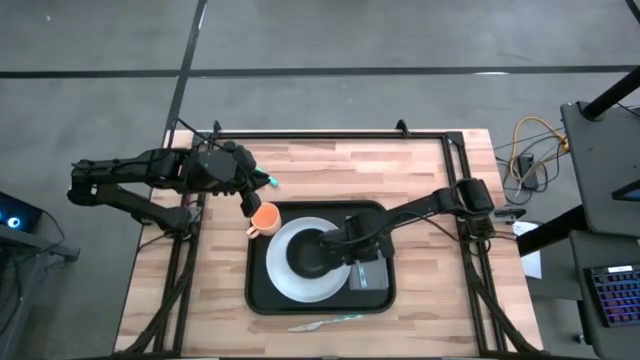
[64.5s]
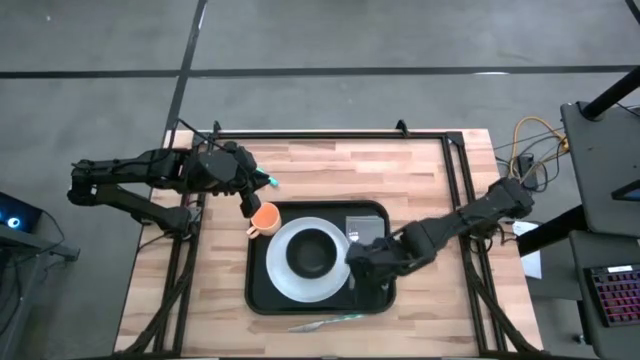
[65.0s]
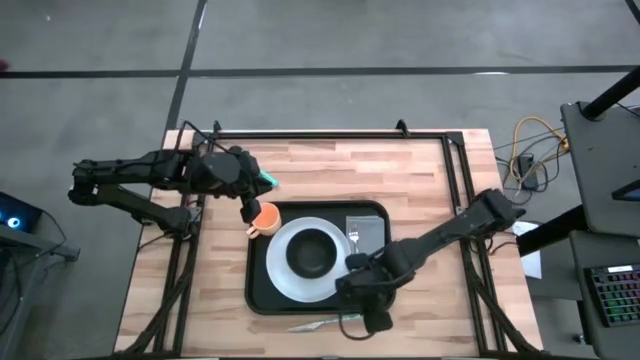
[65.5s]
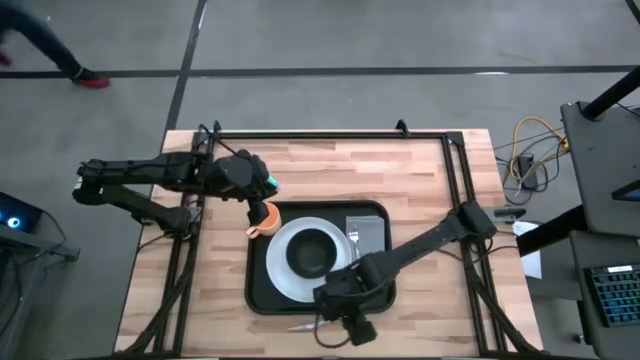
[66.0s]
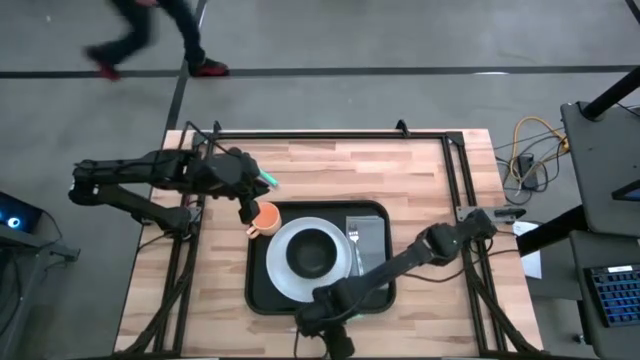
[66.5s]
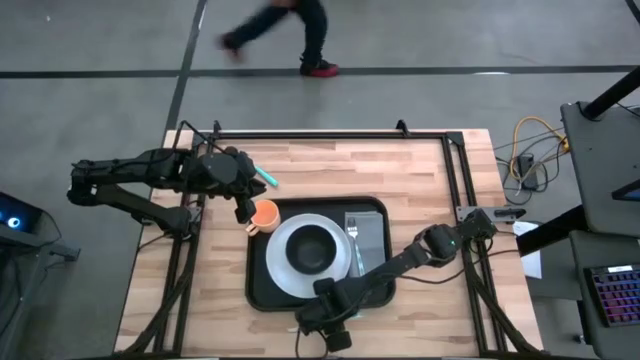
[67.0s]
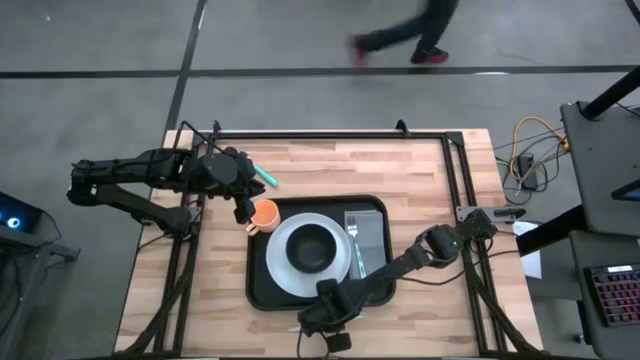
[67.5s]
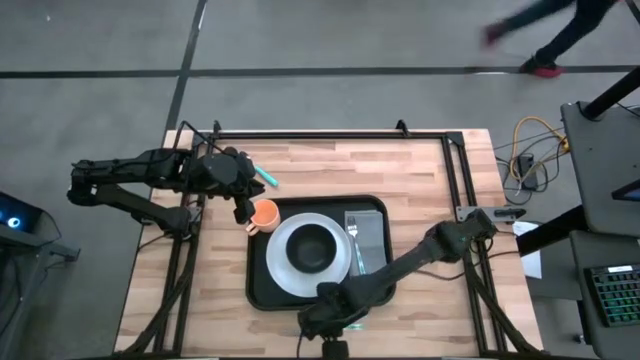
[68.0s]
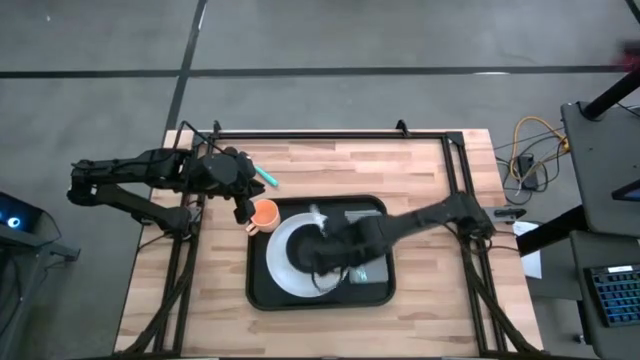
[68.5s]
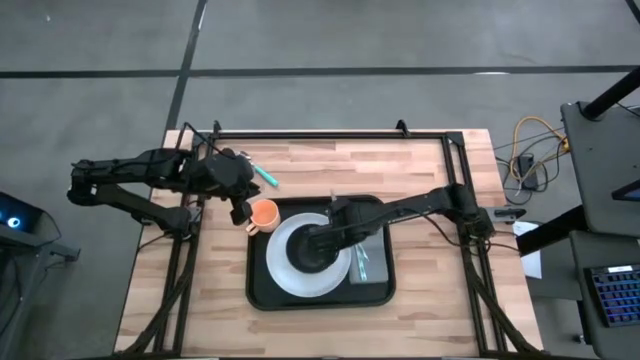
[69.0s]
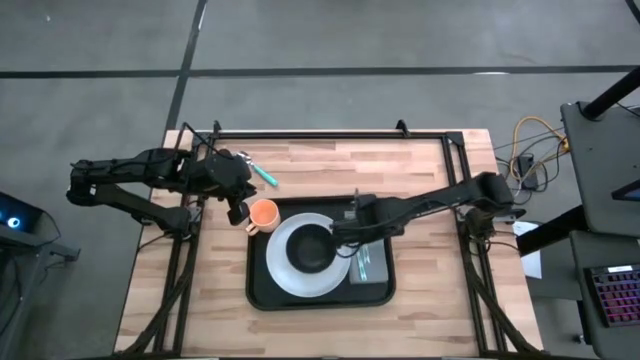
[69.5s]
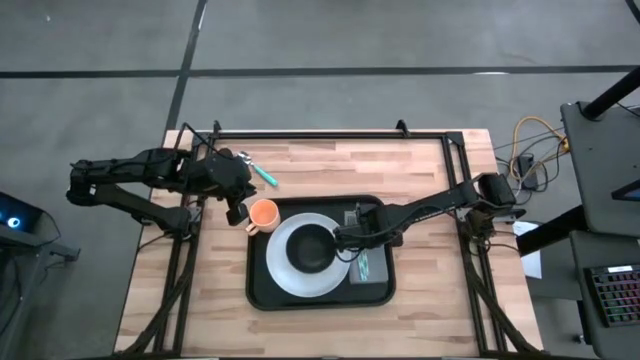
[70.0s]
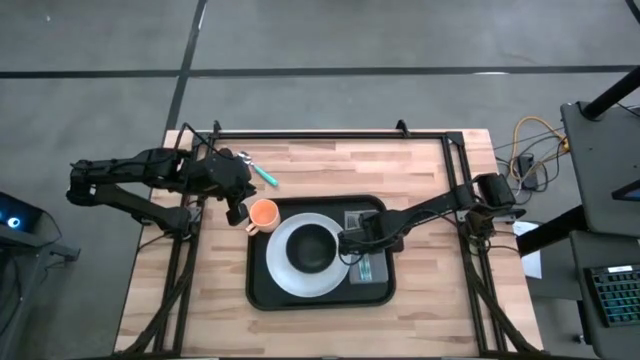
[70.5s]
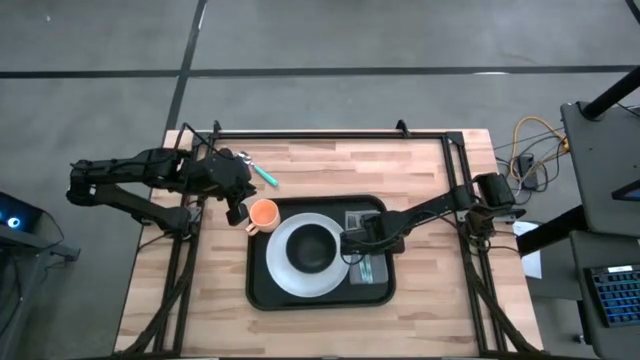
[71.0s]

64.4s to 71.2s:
Task: Set up tray
Put the dinner knife on top of the napkin on the shelf

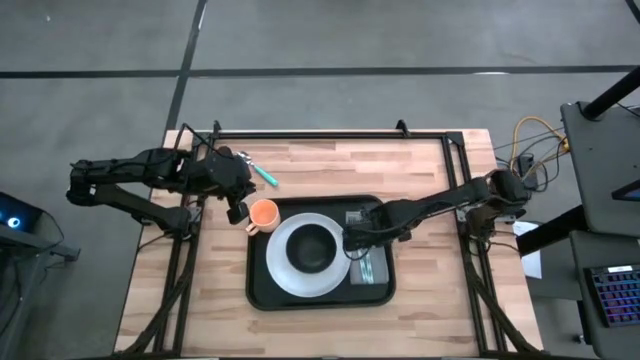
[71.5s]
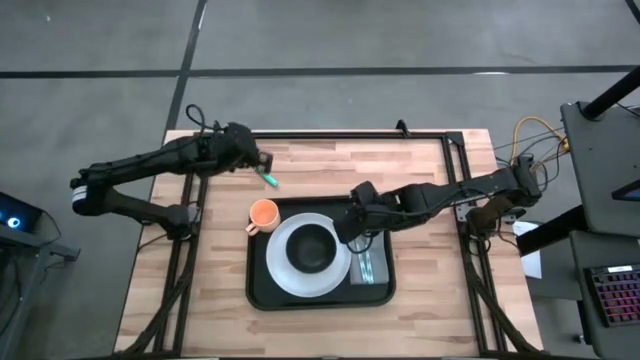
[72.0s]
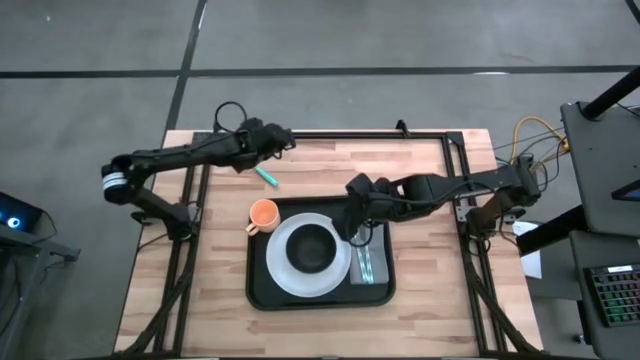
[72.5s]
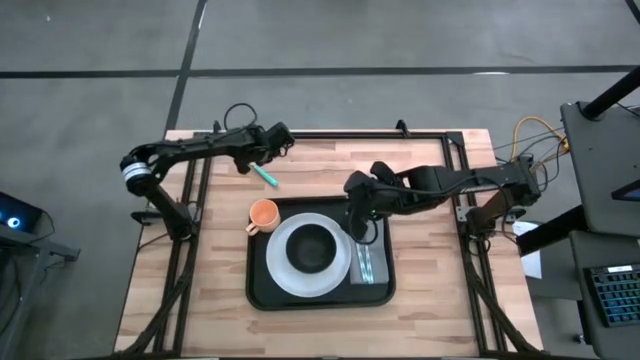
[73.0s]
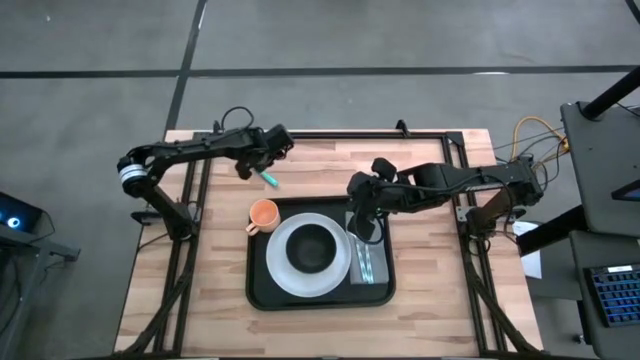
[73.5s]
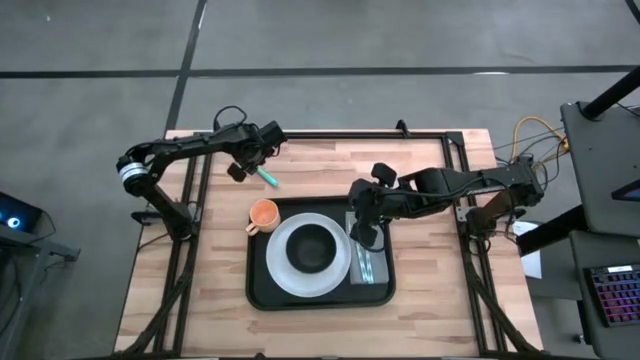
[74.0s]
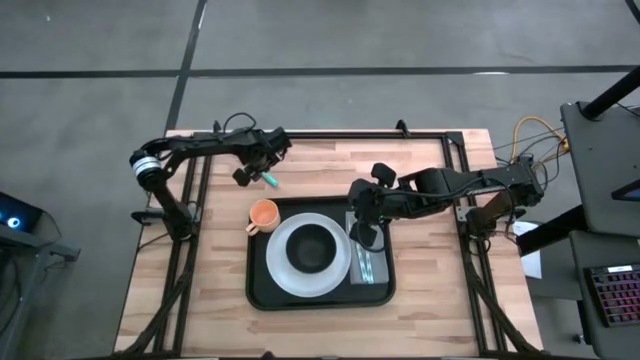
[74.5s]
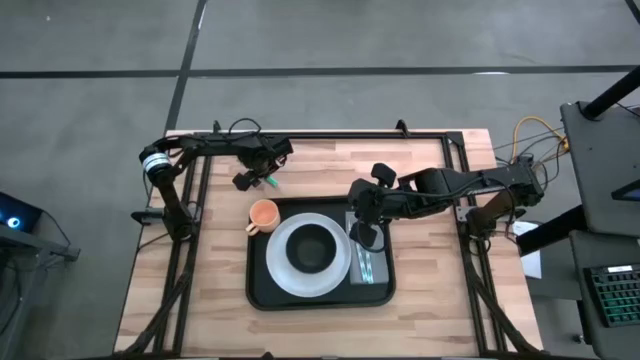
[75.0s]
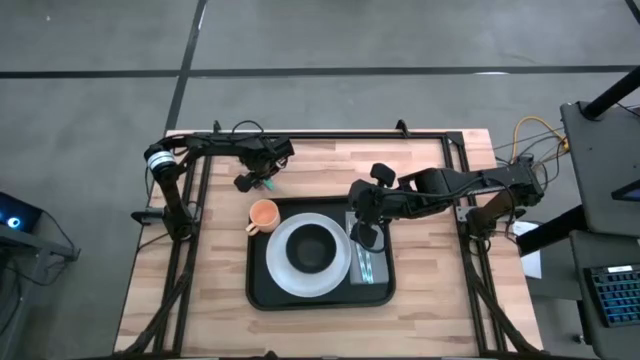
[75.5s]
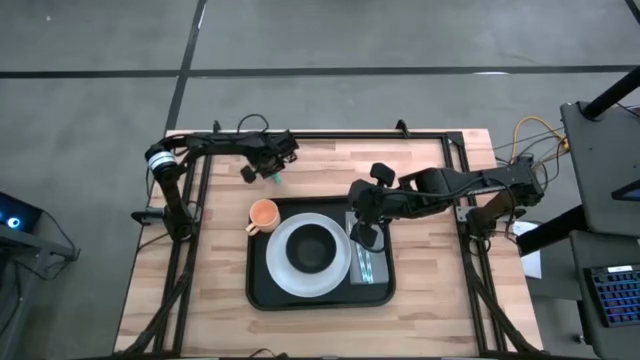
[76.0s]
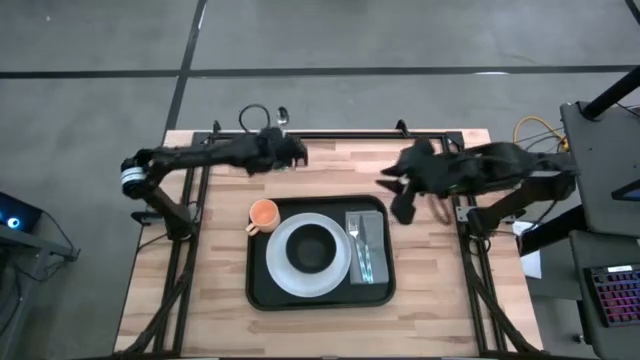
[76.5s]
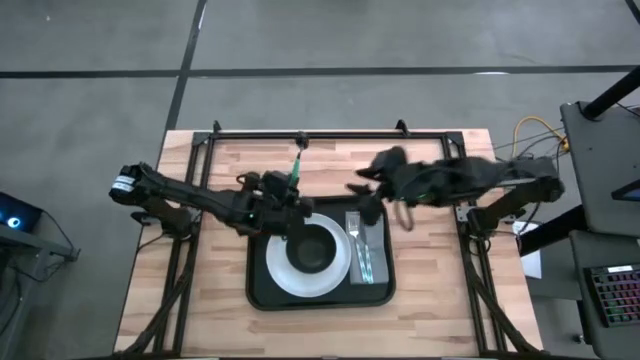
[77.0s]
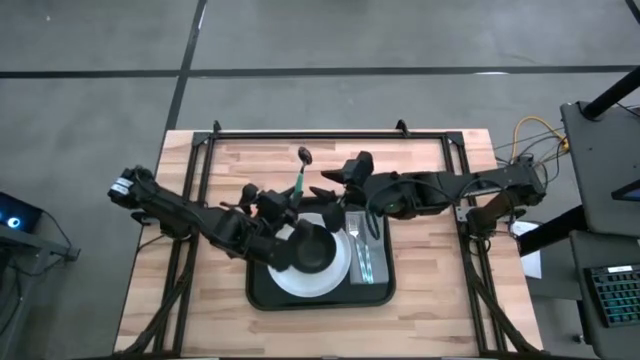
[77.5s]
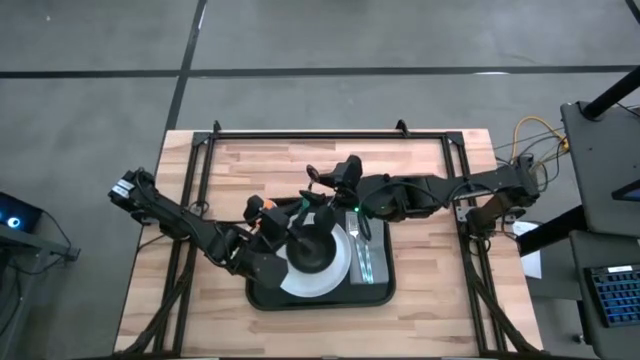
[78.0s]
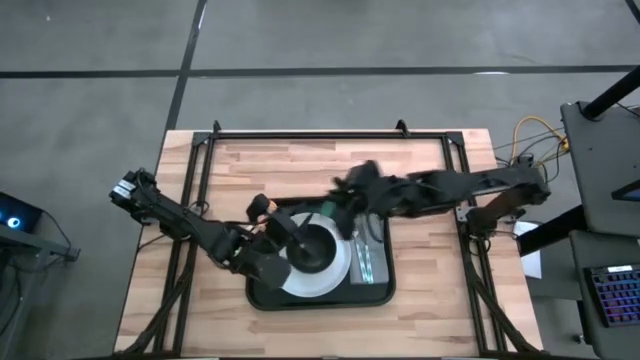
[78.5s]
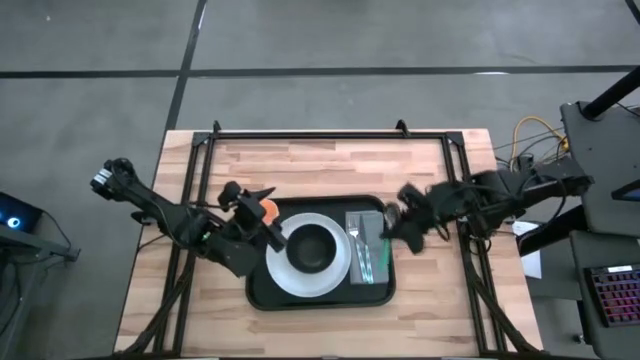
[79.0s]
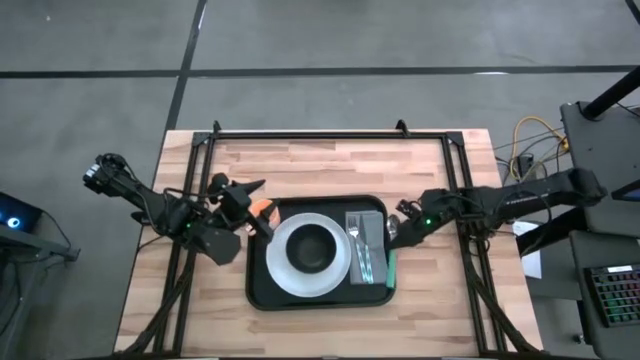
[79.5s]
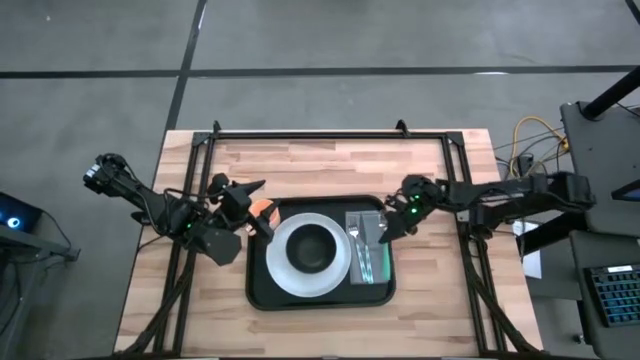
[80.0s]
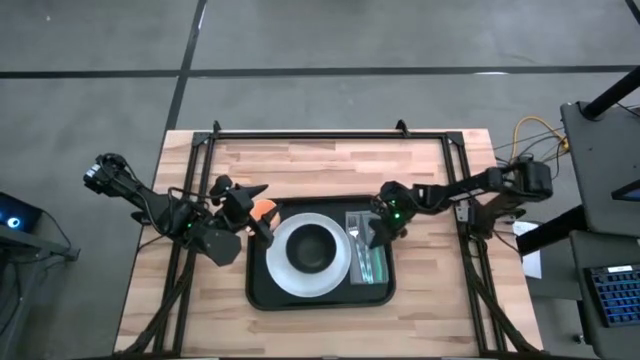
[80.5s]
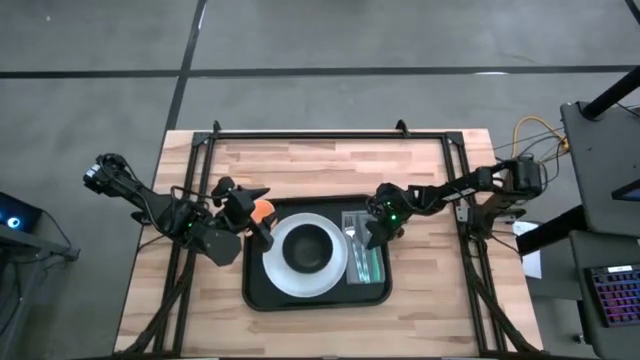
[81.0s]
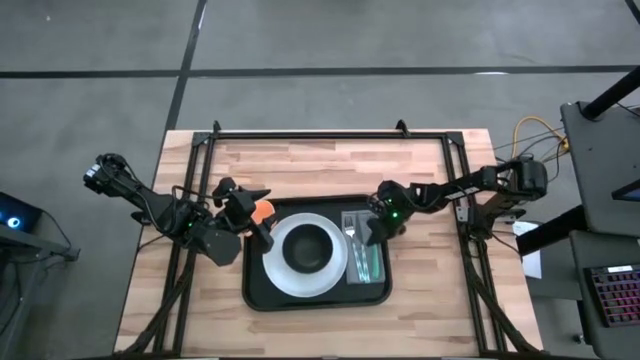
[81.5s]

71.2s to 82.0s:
Put the spoon on top of the napkin on the shelf

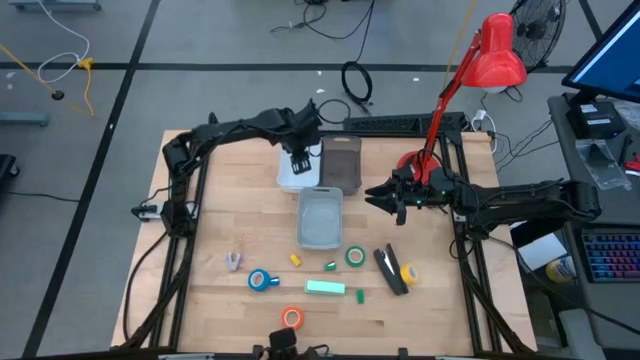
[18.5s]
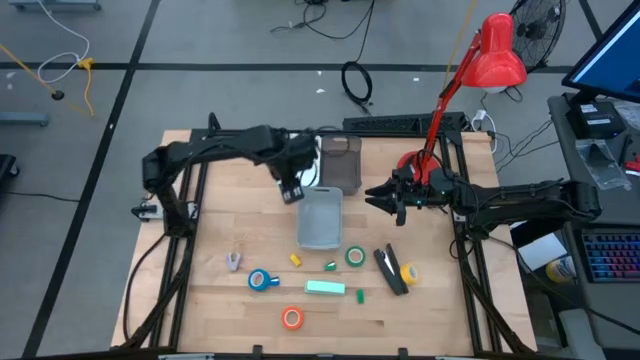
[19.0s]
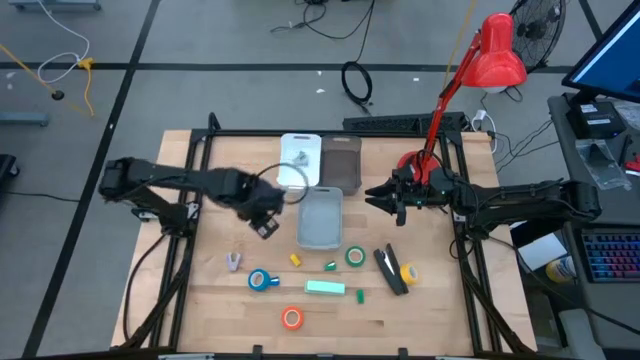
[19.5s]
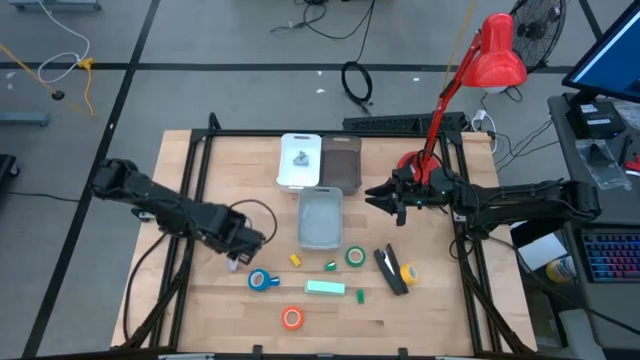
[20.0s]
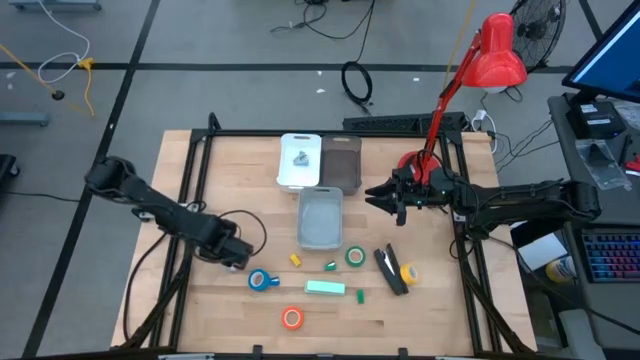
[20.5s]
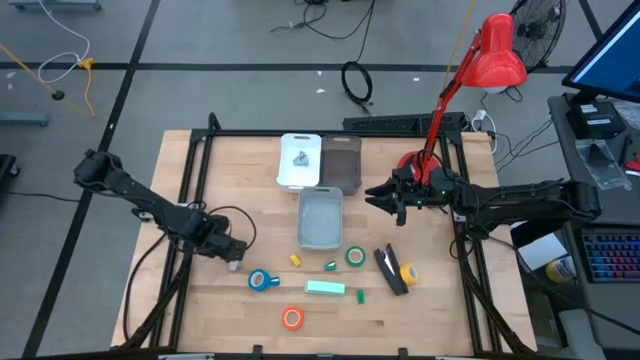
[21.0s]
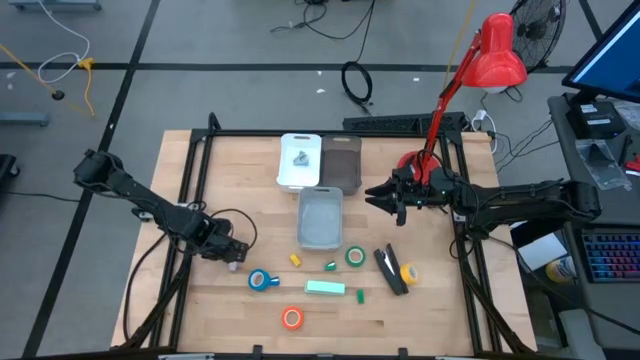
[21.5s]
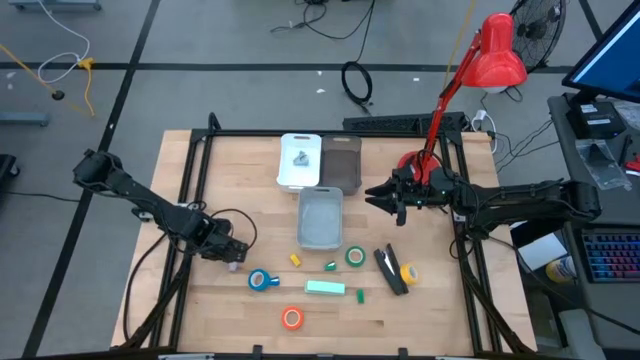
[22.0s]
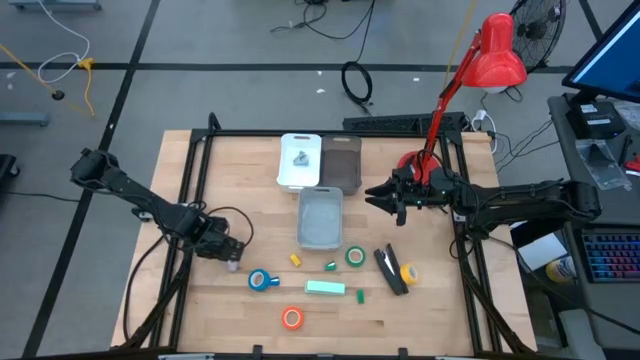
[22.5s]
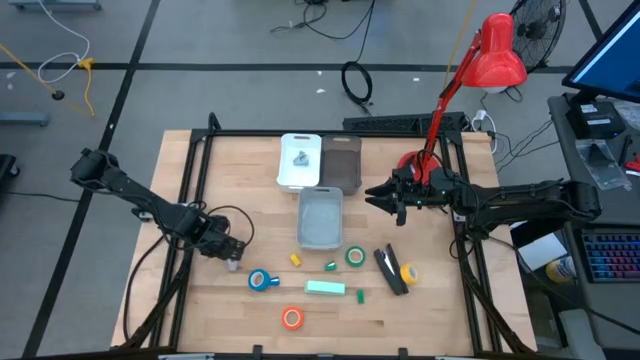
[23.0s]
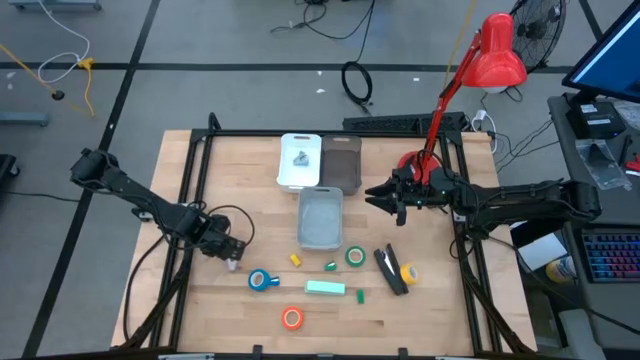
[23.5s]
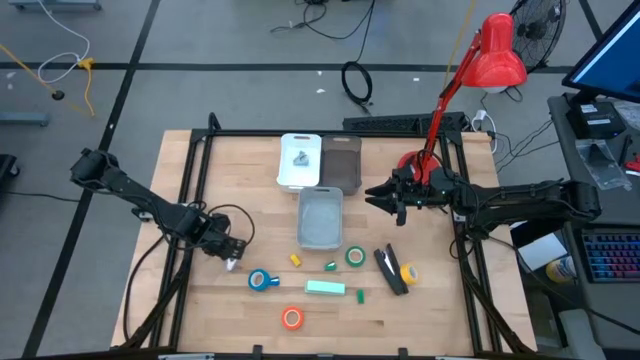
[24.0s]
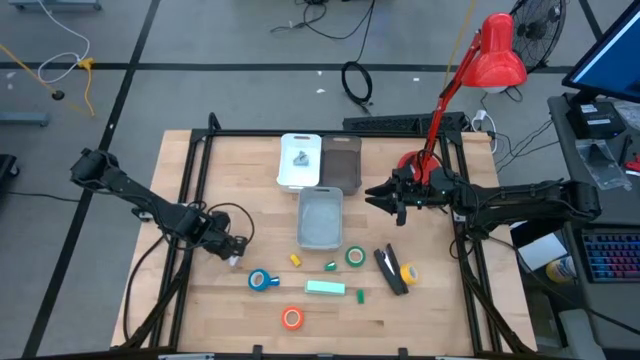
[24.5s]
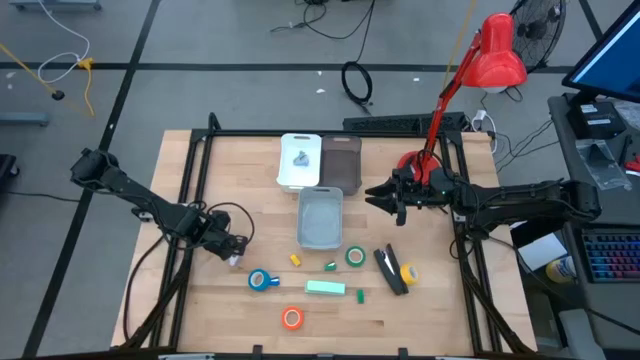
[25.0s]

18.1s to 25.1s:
Task: Pick and place Stapler, Stapler remover, tape
Put the violet staple remover into the white bin
